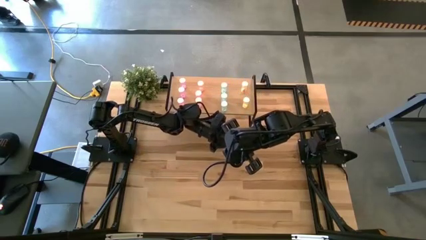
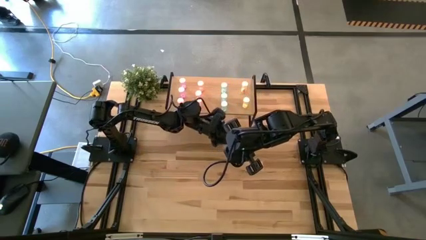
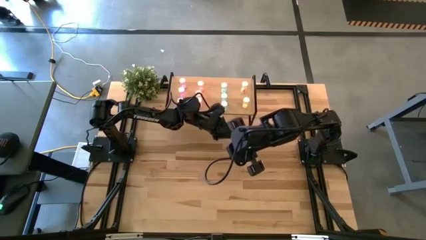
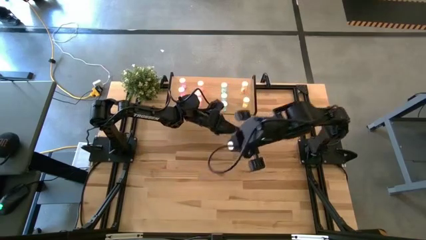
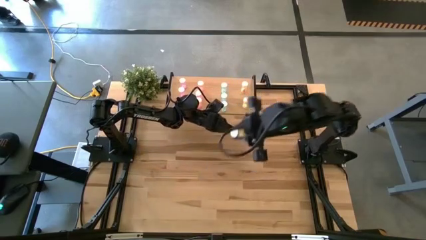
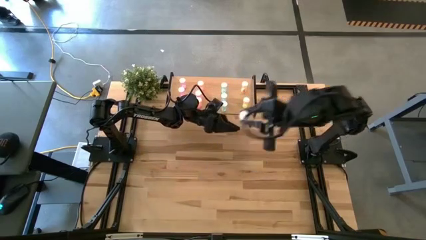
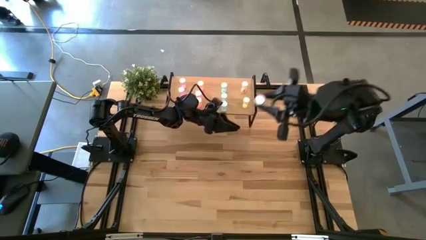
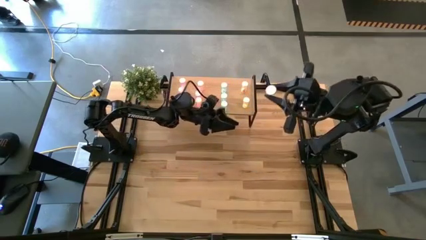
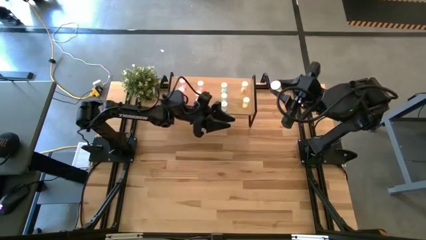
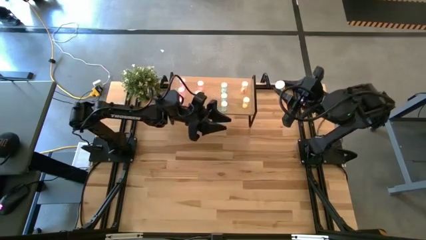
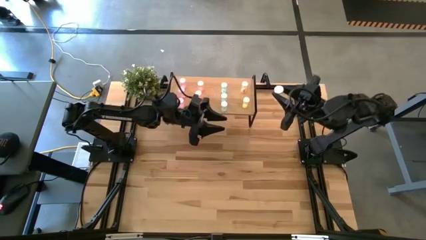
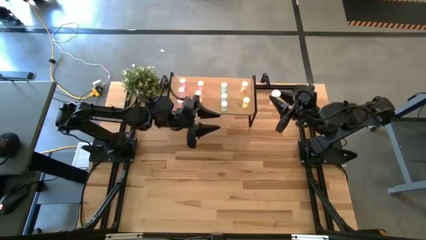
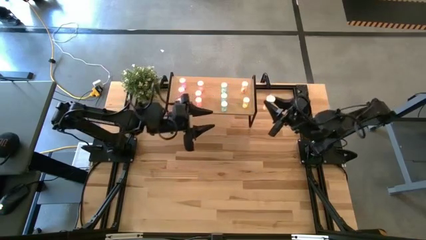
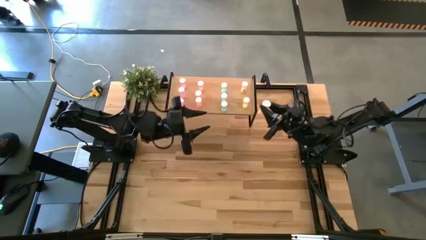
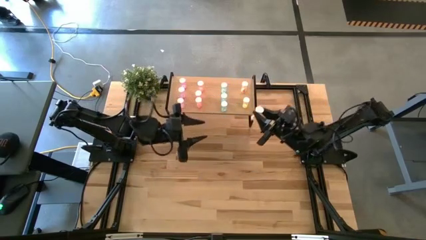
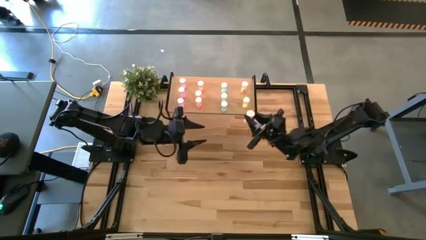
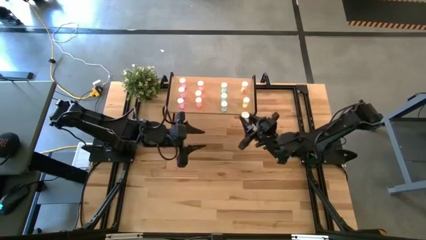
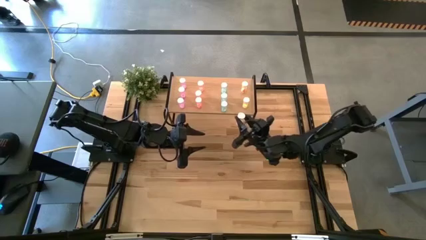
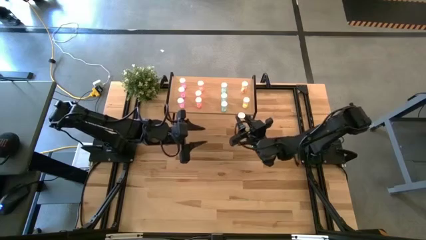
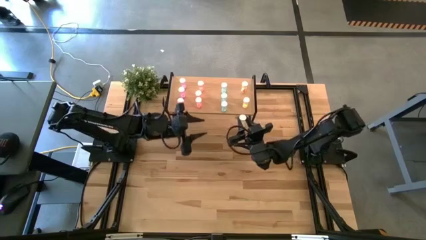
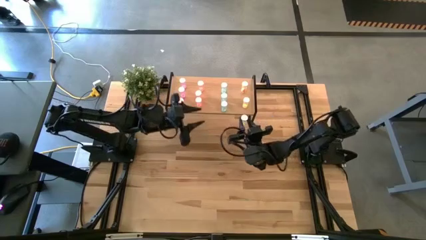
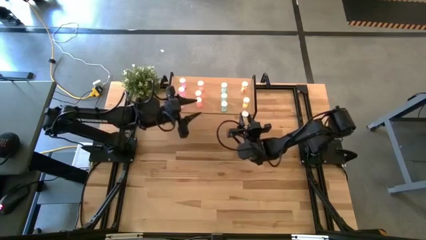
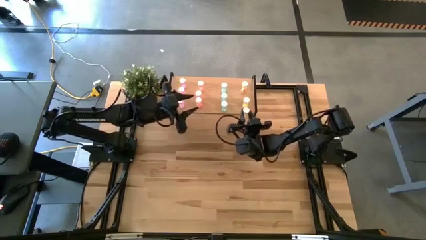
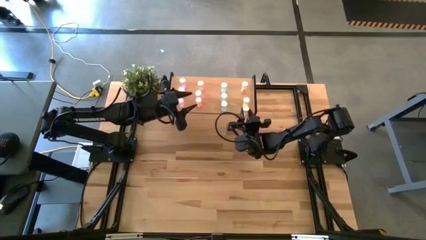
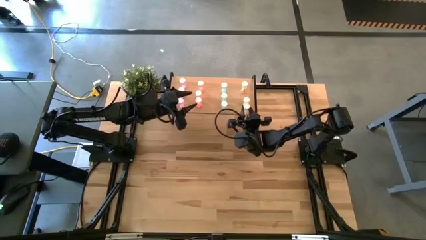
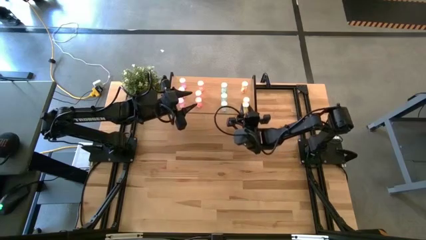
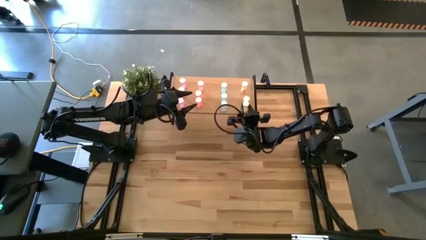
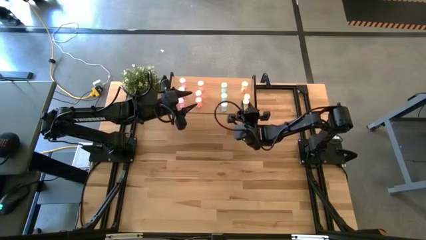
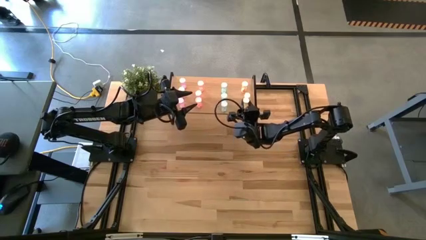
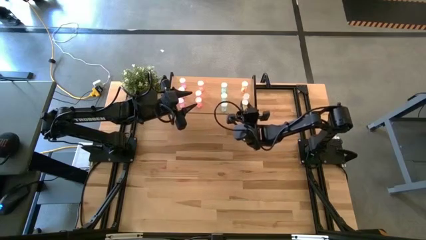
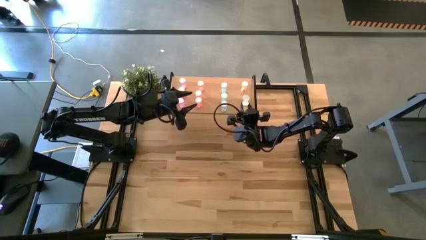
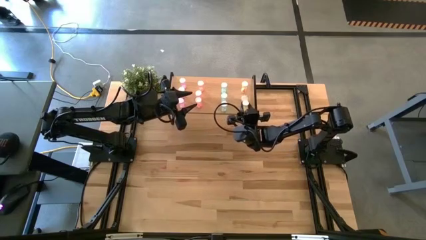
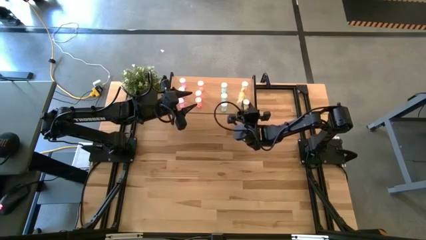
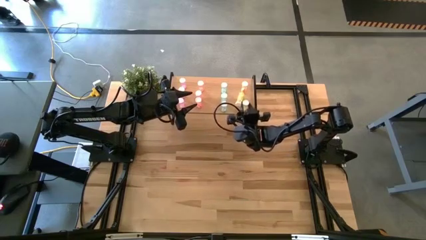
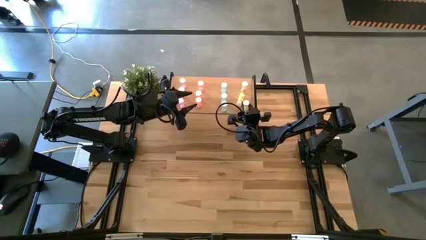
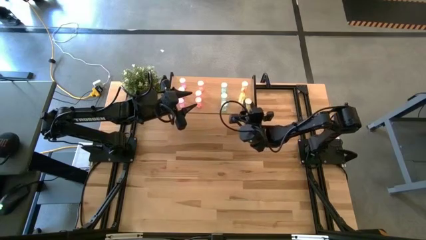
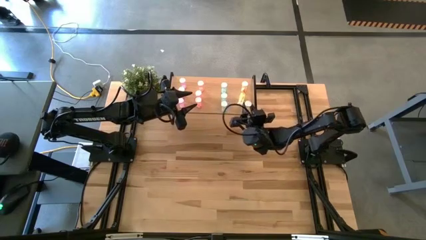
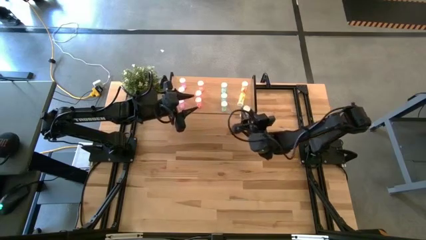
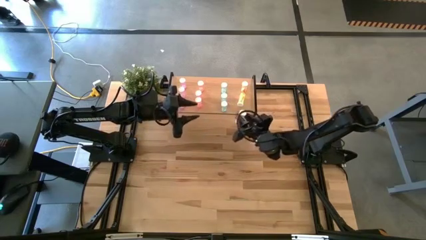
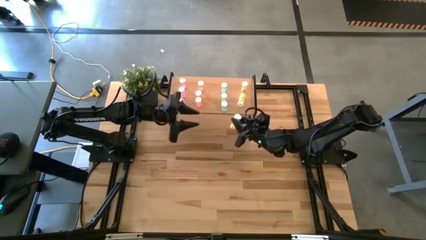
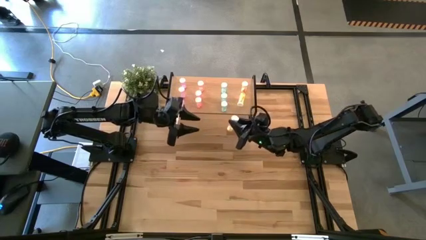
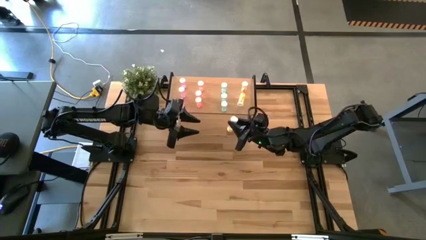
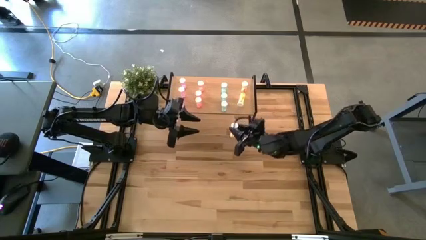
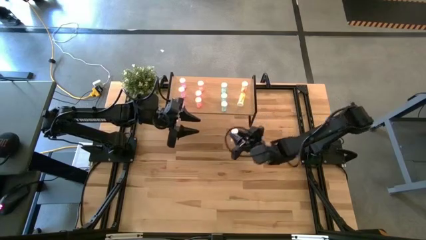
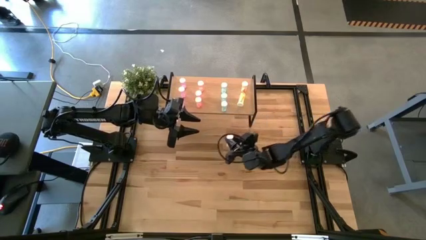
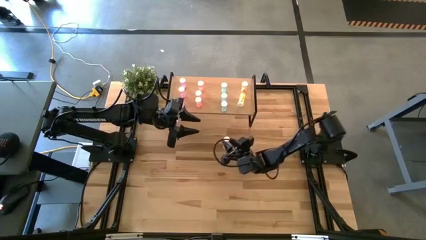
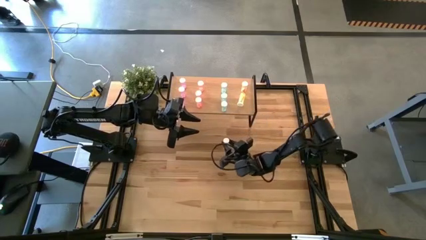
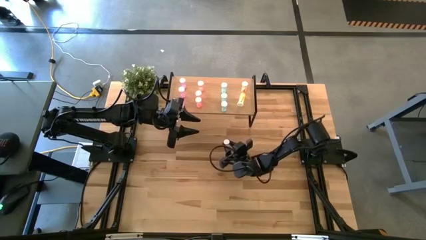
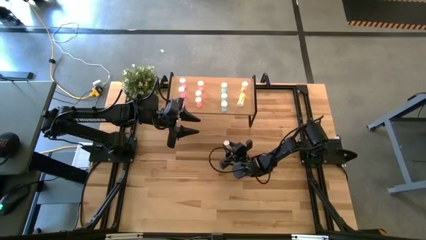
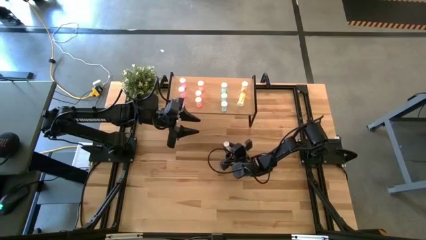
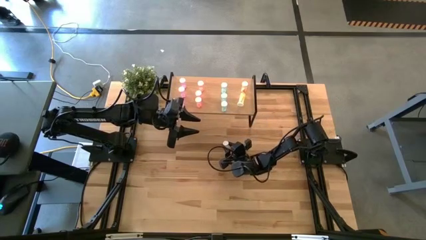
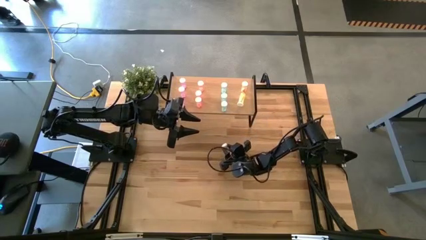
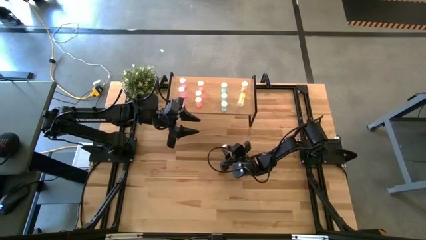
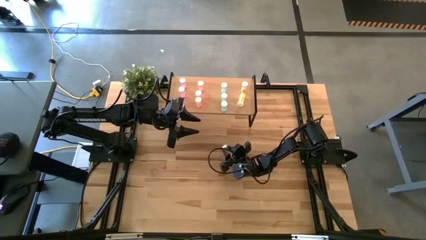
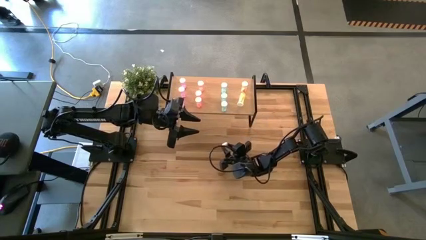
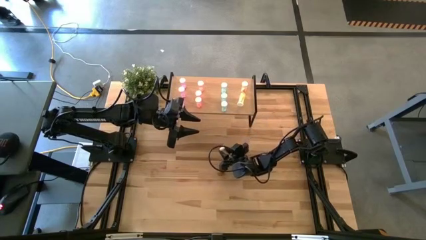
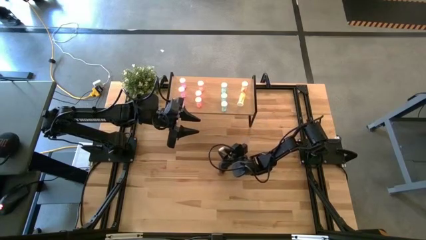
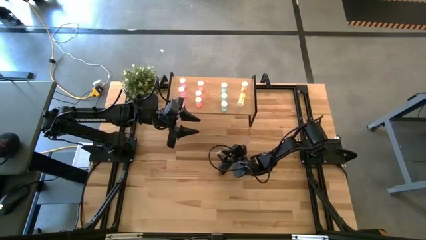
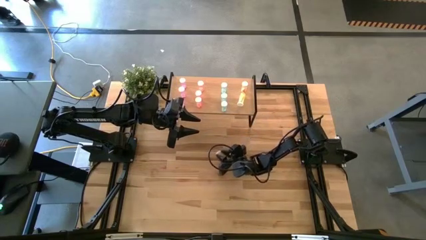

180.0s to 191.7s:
Task: Pick and place medicine bottles onto shelf by color
Put the yellow pill bottle on the shelf aligned with the other yellow pill bottles
